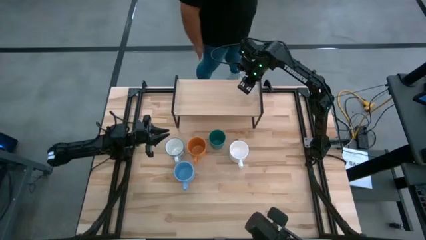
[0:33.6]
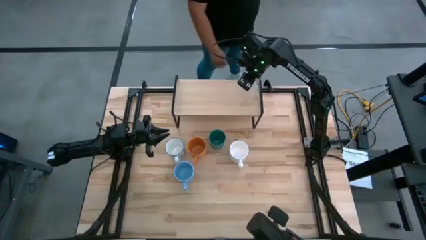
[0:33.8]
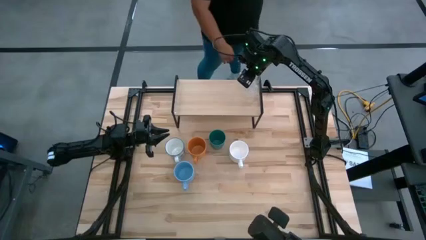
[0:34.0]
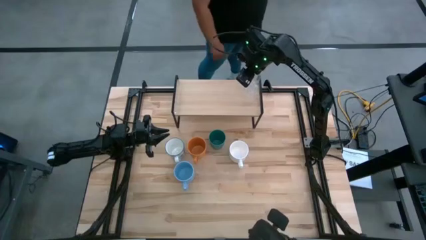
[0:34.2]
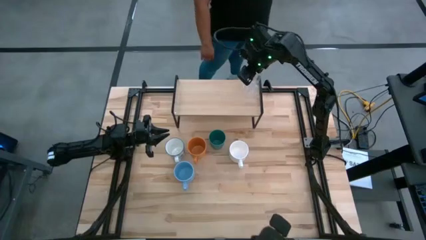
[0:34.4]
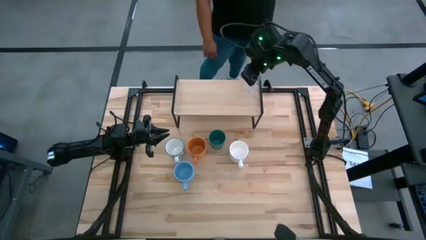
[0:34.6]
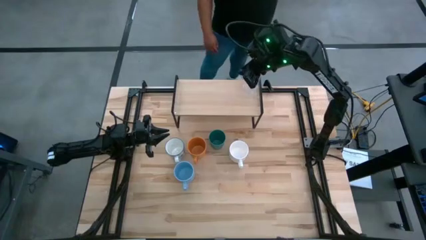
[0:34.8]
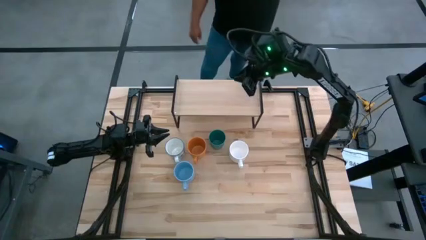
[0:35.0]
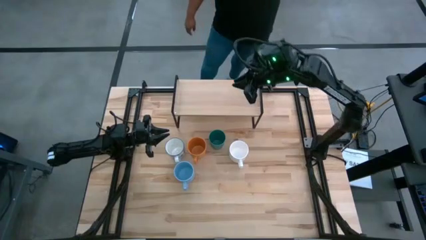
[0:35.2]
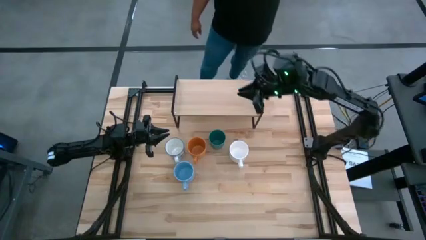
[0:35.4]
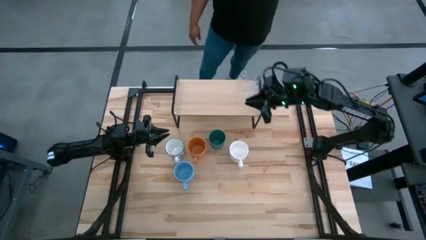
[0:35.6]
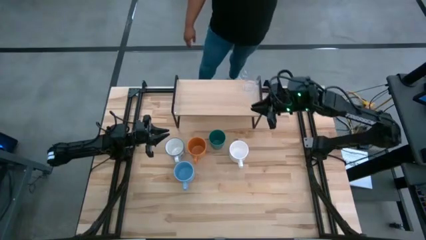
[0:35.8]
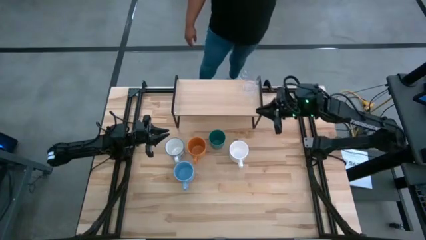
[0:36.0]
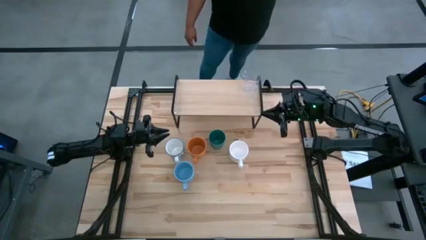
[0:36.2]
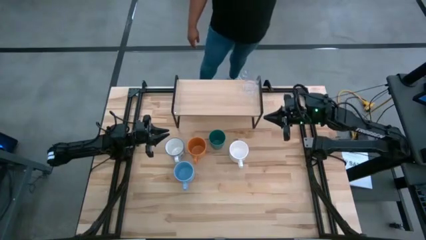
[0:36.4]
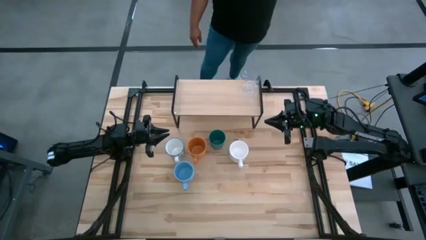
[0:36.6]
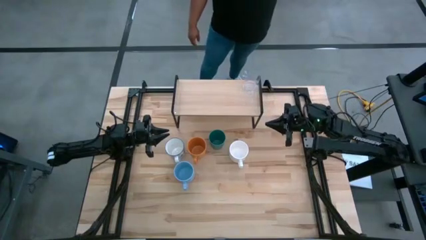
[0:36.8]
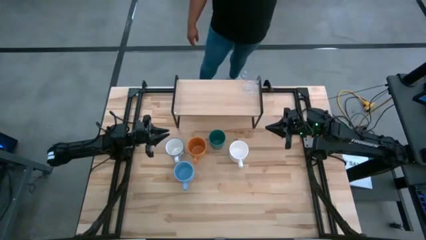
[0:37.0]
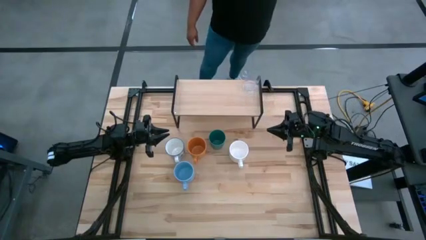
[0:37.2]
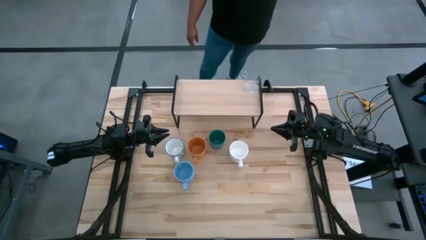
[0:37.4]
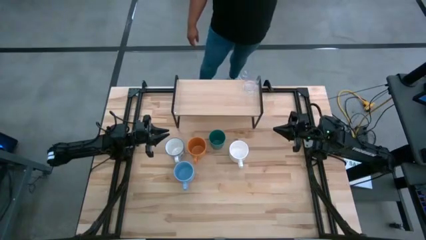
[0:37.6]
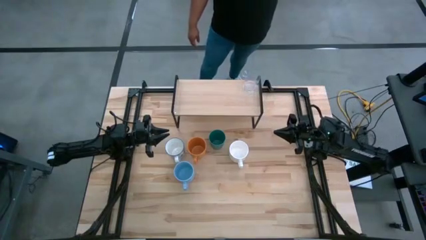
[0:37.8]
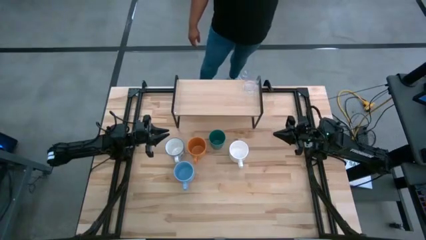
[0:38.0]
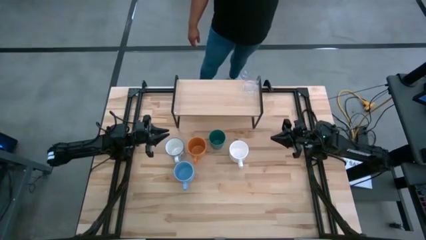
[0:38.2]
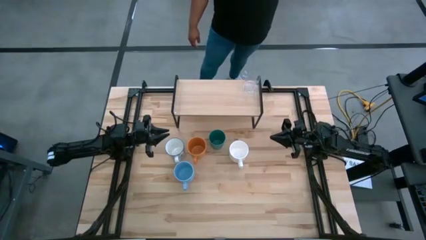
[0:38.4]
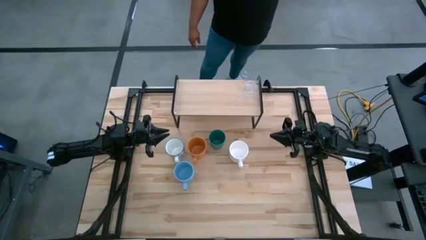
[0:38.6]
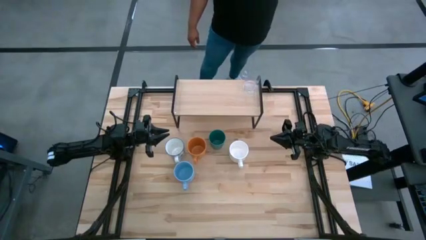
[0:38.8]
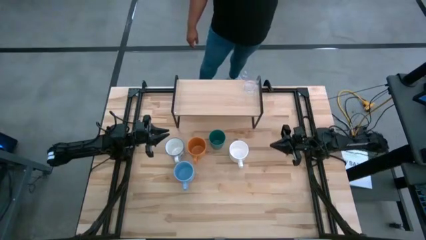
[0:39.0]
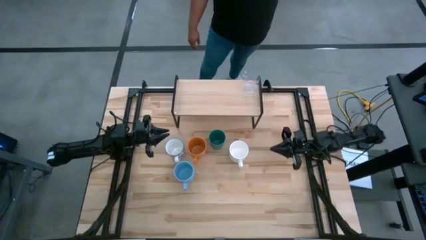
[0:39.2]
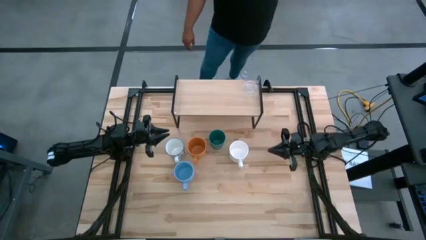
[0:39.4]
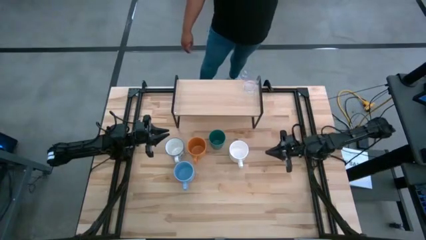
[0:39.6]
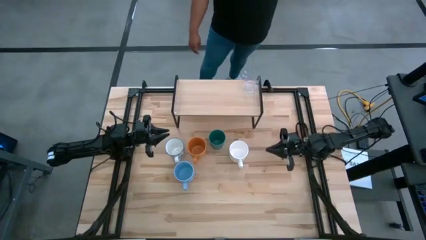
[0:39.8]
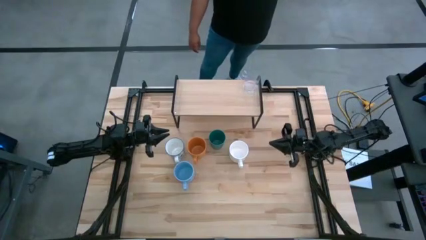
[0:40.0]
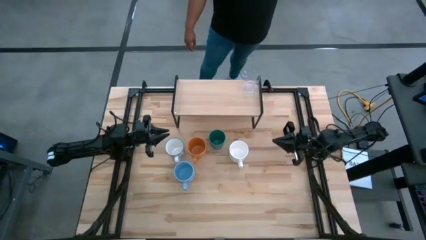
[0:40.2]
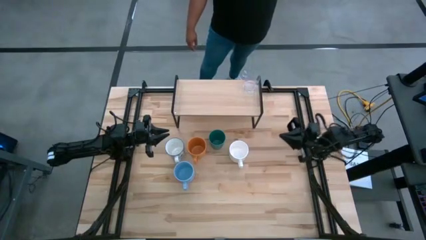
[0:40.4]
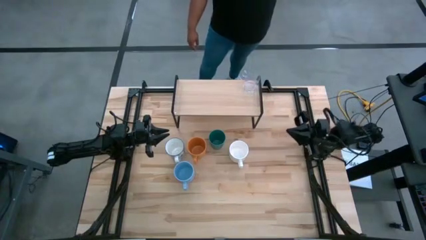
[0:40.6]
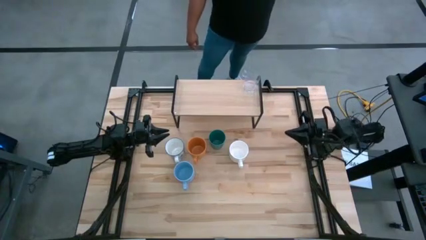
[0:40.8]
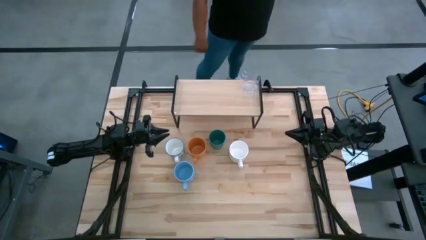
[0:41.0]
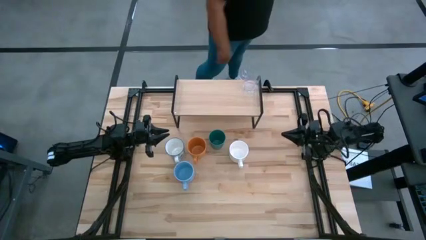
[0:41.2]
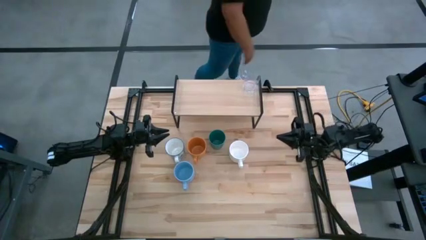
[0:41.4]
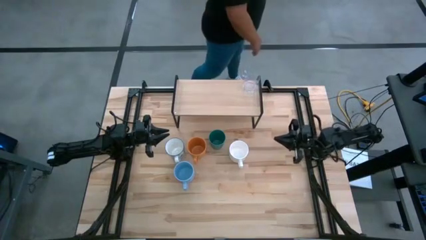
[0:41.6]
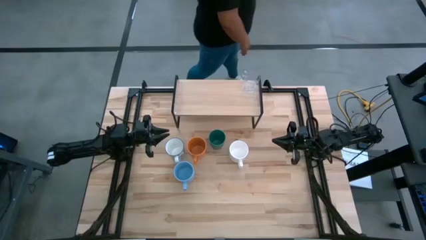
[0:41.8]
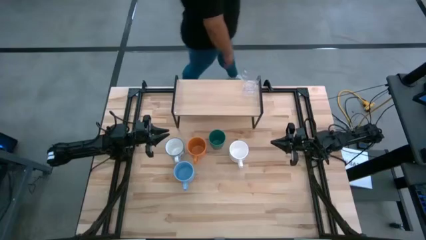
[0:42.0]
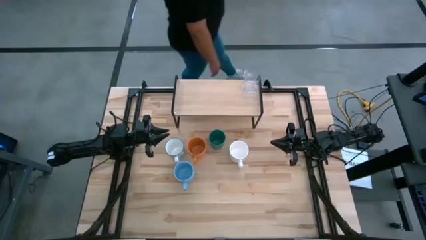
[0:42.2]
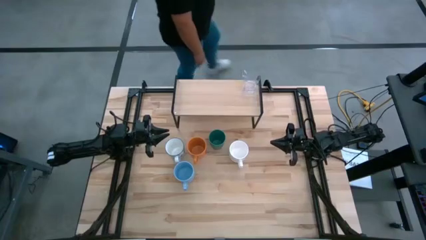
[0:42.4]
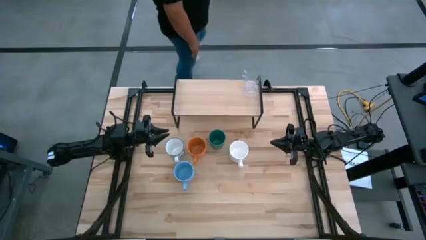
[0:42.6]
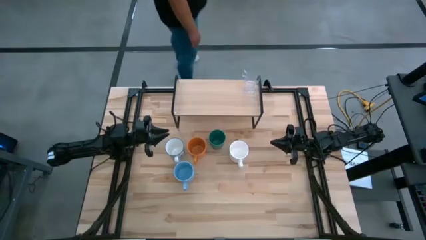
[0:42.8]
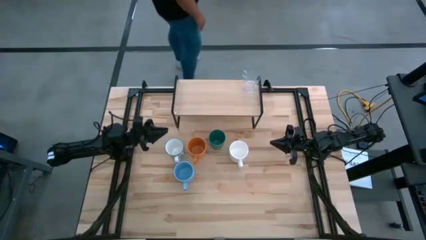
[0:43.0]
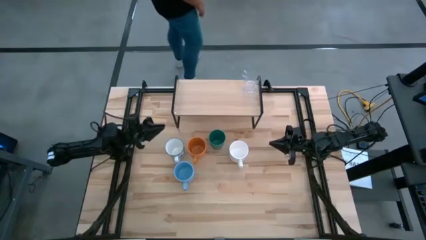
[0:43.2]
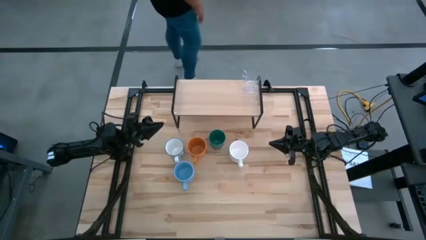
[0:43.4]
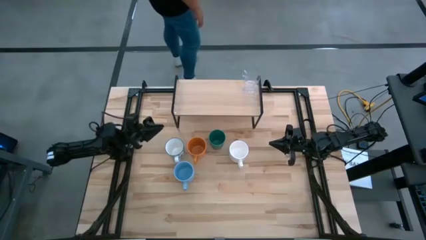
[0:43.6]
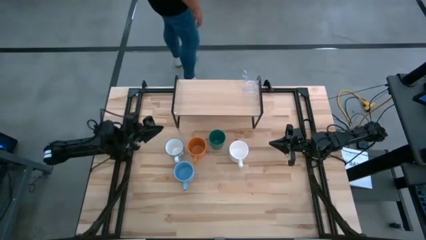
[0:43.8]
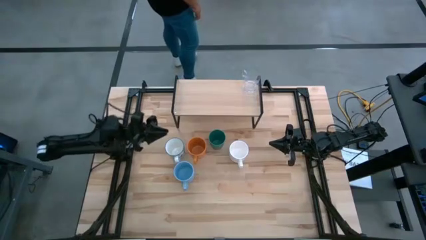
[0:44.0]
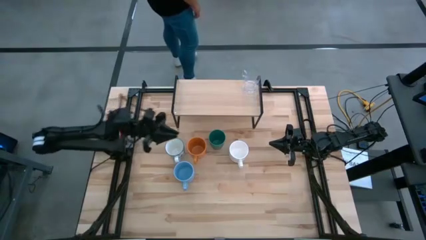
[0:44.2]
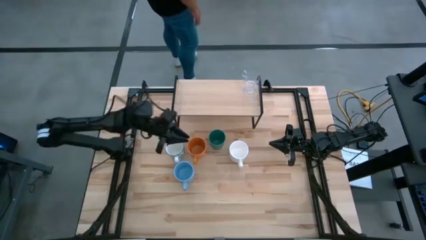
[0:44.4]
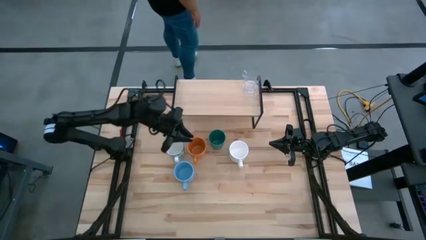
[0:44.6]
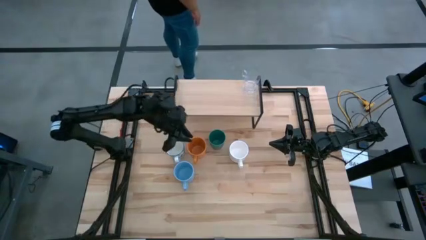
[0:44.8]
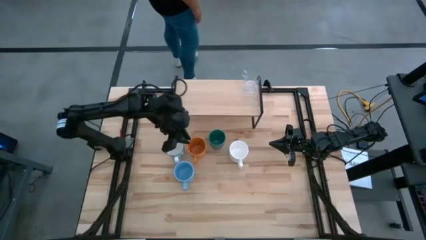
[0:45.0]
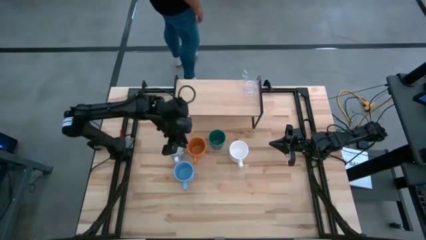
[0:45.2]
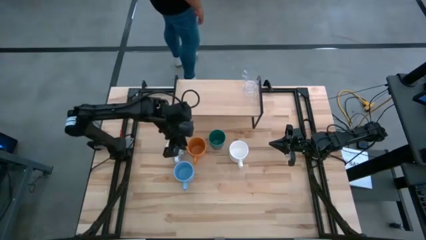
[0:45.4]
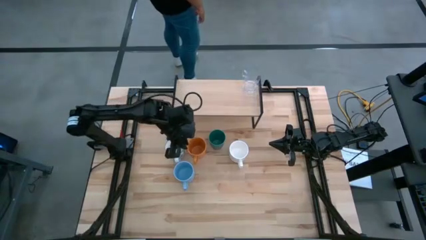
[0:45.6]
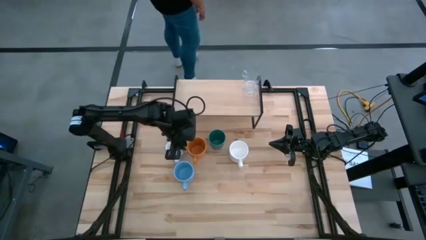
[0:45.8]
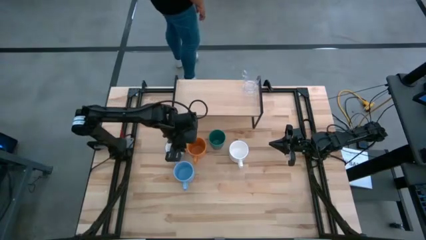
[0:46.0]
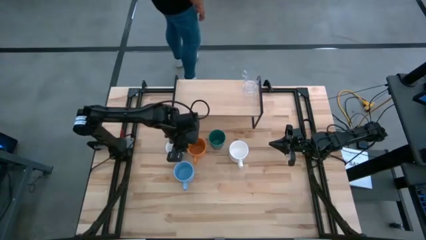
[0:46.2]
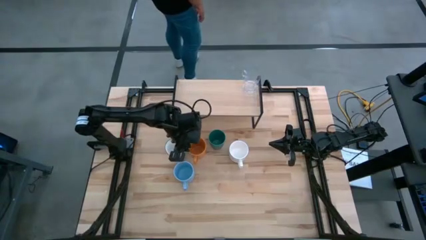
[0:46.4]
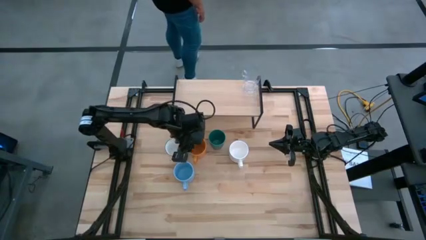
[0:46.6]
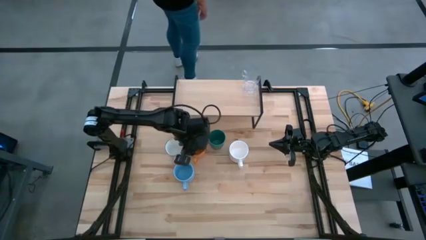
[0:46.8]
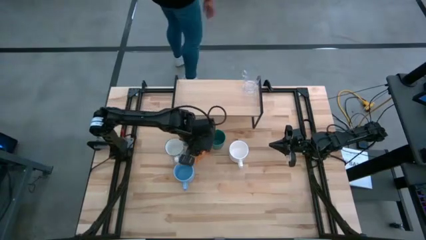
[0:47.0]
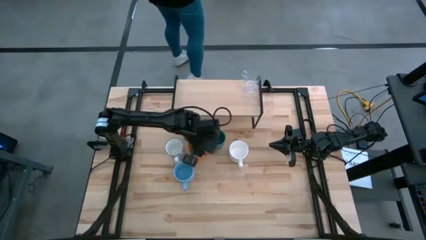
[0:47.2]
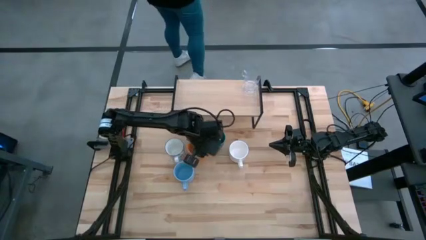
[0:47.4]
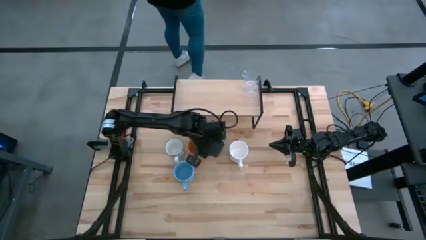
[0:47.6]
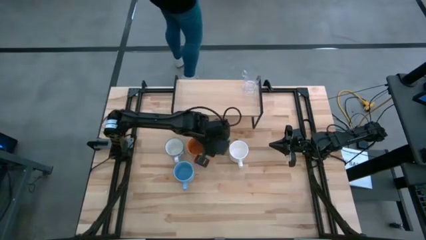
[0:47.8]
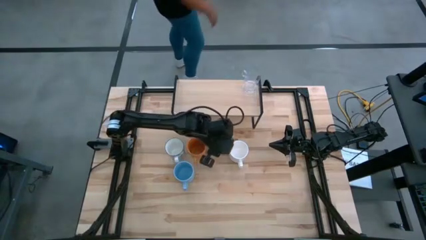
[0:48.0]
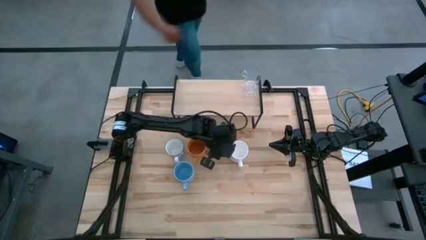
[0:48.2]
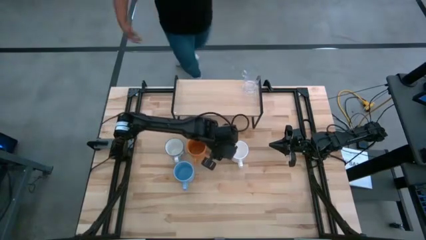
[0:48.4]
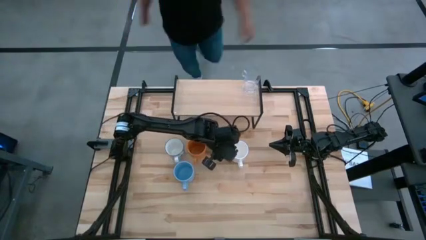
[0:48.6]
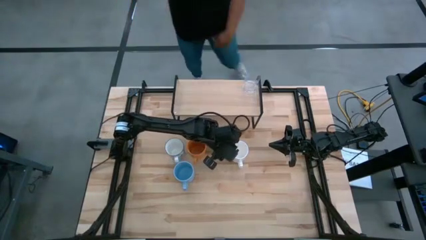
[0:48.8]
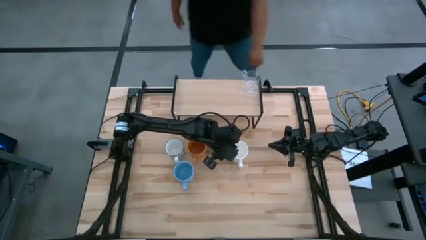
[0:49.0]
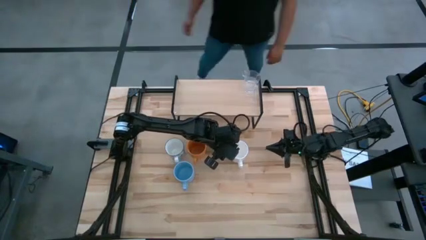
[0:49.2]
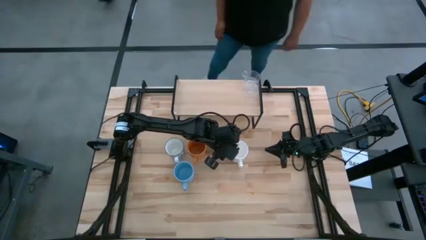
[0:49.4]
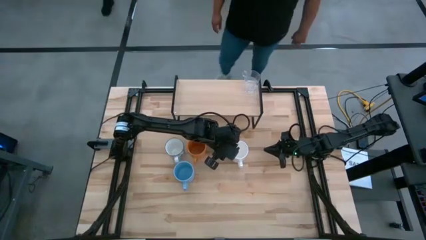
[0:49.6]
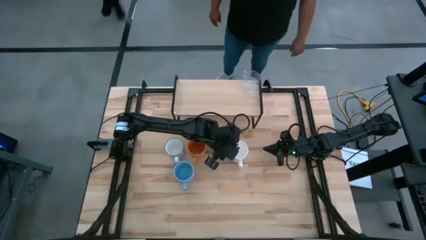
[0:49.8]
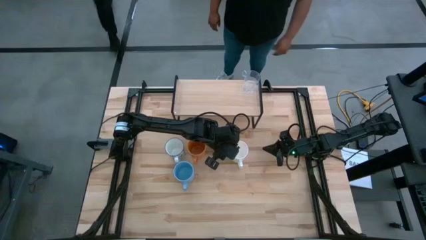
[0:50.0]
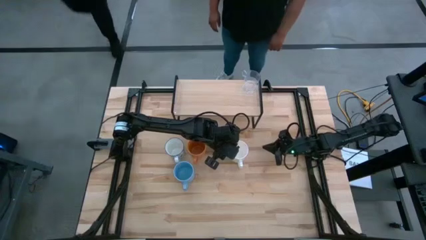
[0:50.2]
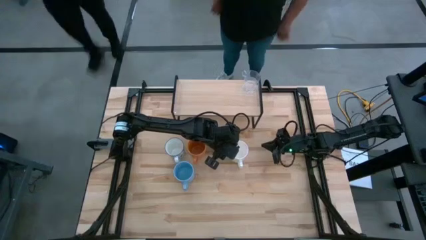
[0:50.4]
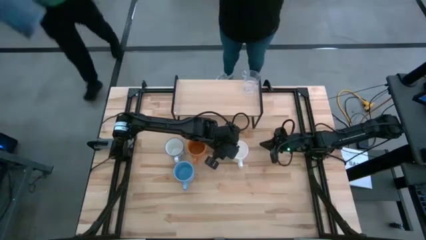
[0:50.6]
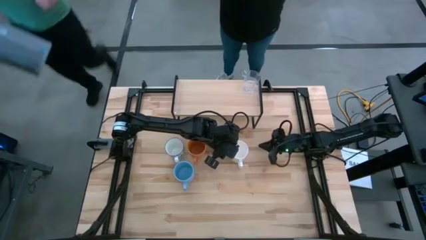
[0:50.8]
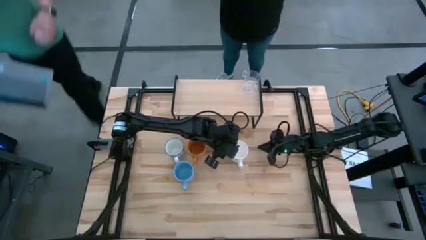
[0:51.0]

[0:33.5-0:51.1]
Task: Stack small to large cups/mugs on shelf
Put the white mug on the shelf

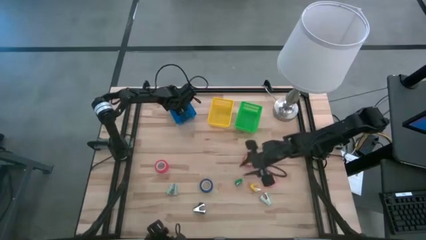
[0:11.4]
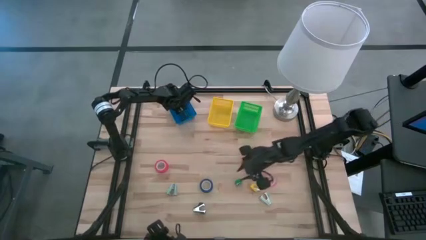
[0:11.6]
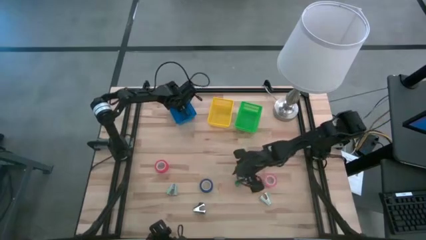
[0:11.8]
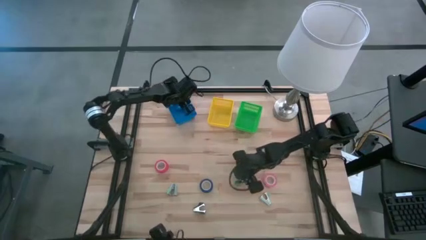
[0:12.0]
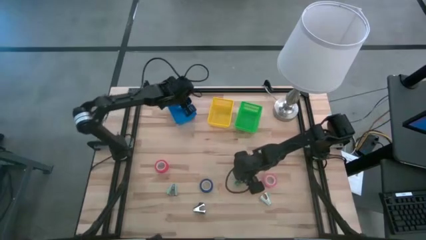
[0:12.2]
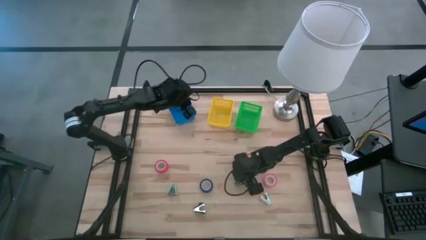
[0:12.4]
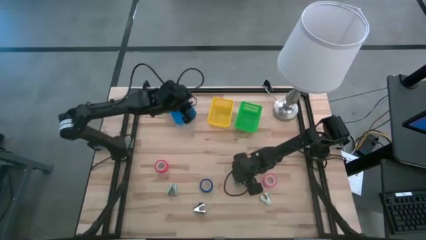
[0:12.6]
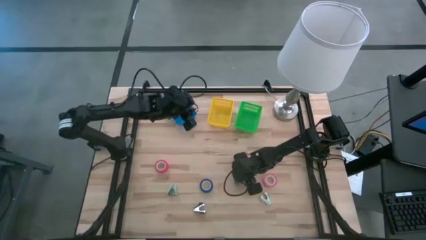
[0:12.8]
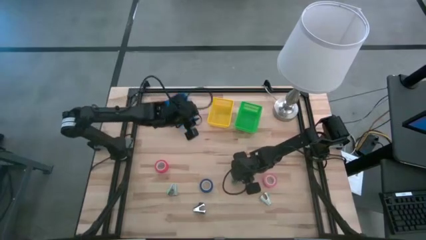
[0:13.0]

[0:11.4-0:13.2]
Task: Pick and place Stapler, Stapler remover, tape
Put the green stapler into the blue bin
